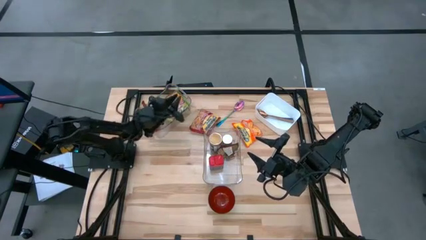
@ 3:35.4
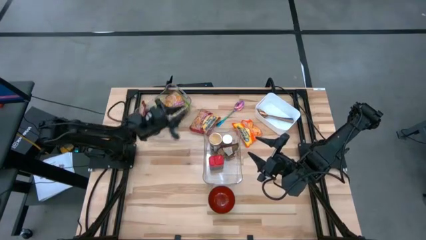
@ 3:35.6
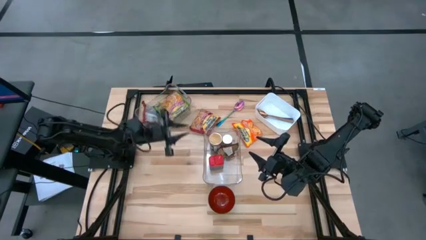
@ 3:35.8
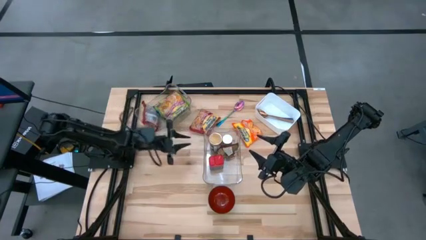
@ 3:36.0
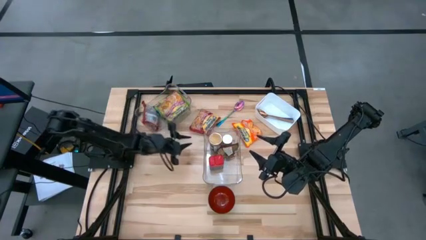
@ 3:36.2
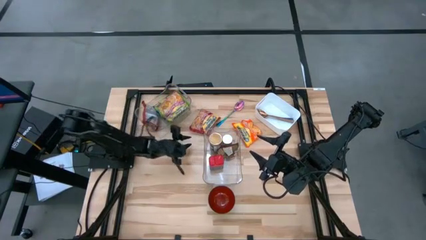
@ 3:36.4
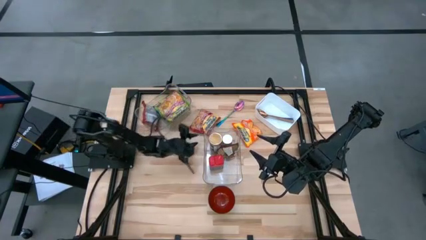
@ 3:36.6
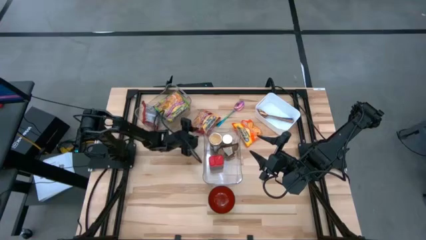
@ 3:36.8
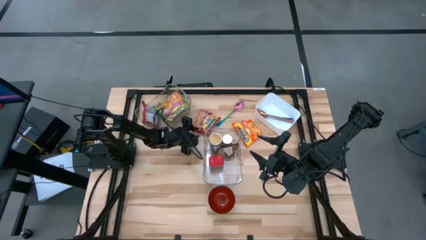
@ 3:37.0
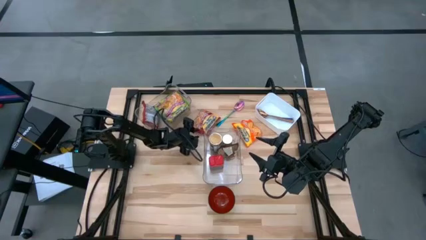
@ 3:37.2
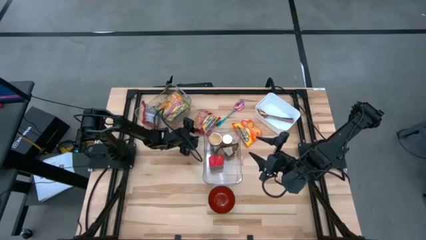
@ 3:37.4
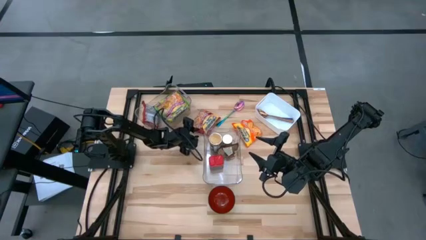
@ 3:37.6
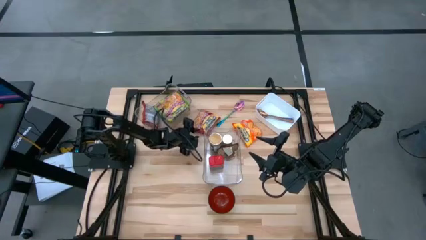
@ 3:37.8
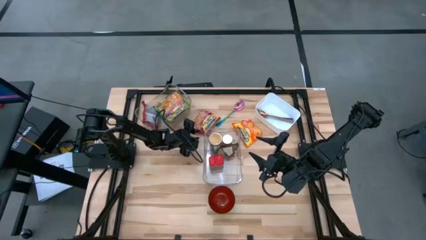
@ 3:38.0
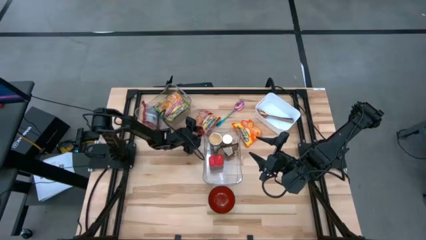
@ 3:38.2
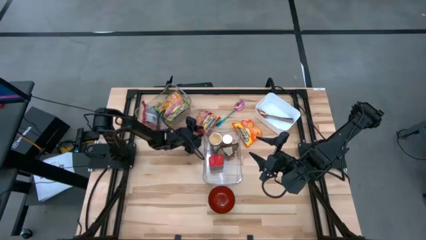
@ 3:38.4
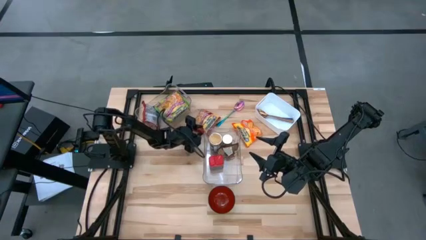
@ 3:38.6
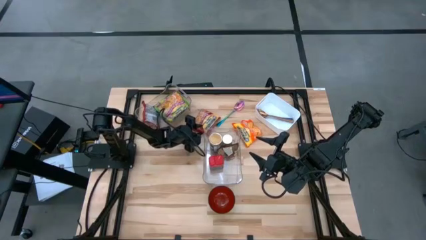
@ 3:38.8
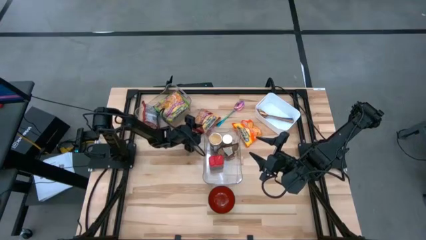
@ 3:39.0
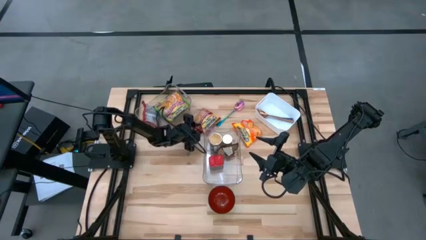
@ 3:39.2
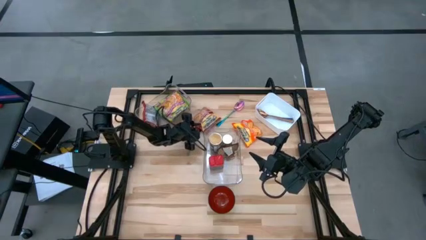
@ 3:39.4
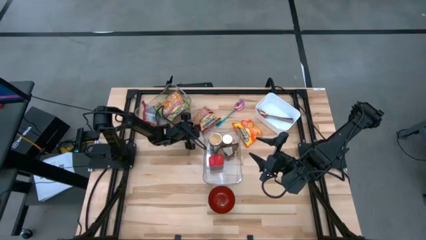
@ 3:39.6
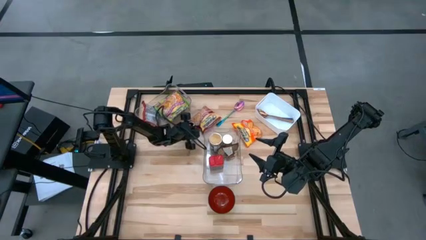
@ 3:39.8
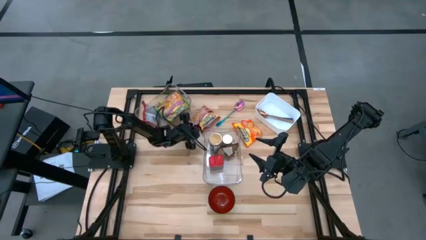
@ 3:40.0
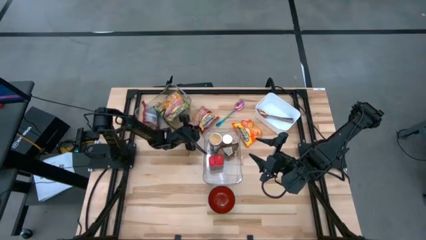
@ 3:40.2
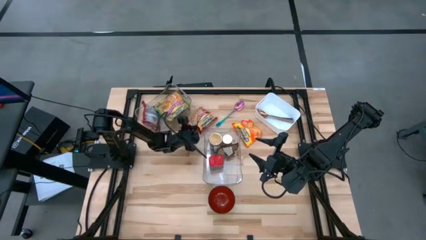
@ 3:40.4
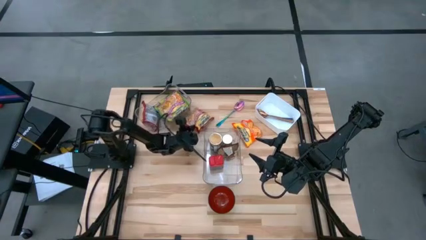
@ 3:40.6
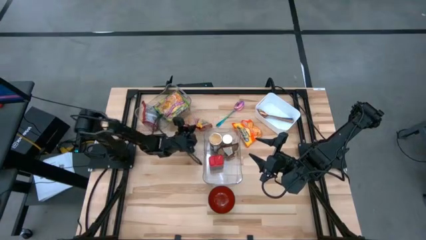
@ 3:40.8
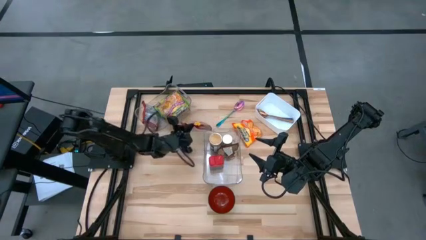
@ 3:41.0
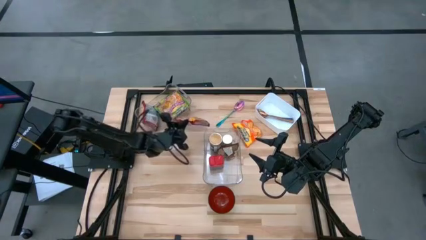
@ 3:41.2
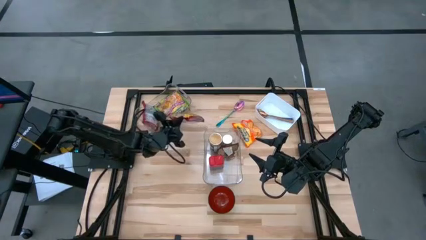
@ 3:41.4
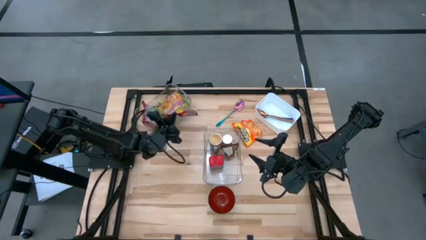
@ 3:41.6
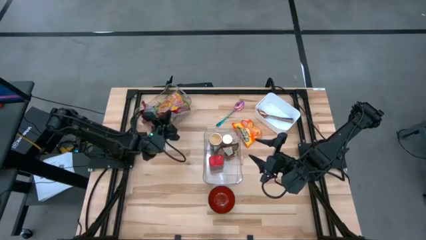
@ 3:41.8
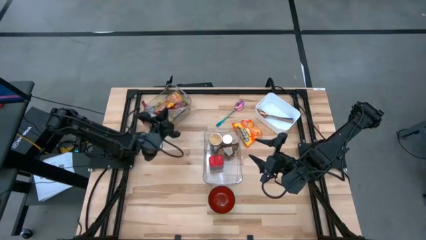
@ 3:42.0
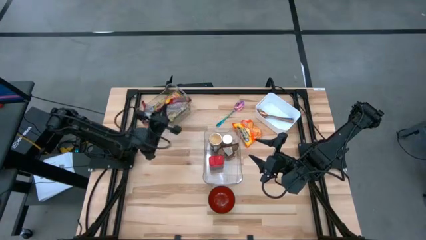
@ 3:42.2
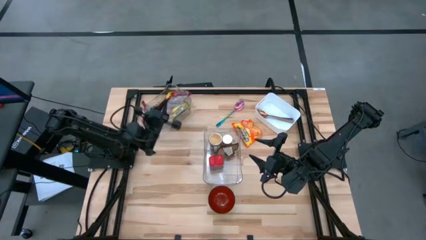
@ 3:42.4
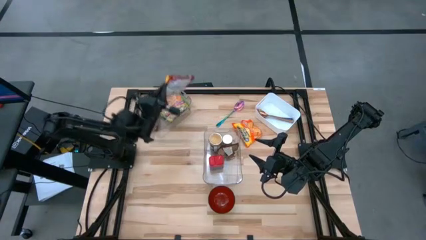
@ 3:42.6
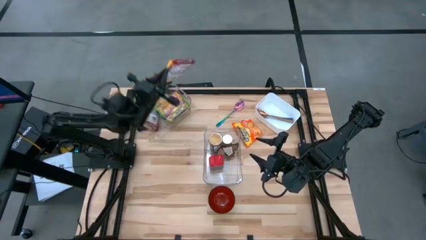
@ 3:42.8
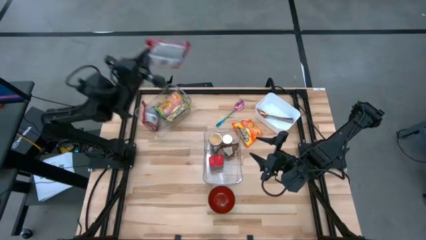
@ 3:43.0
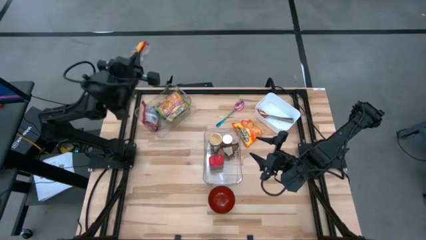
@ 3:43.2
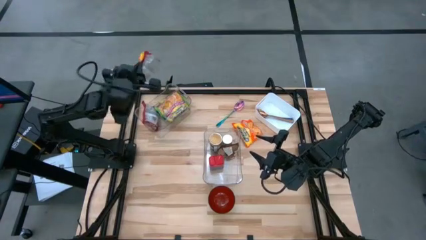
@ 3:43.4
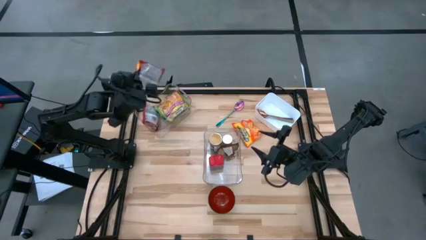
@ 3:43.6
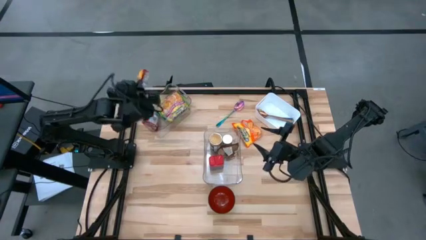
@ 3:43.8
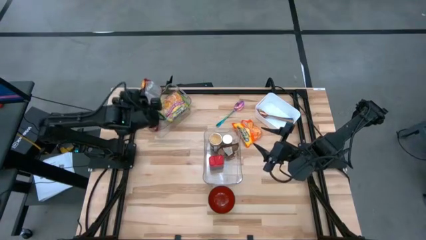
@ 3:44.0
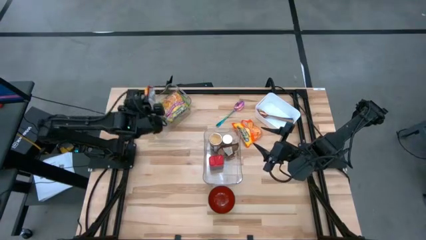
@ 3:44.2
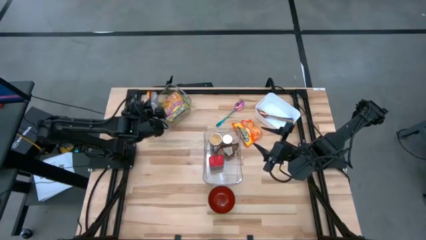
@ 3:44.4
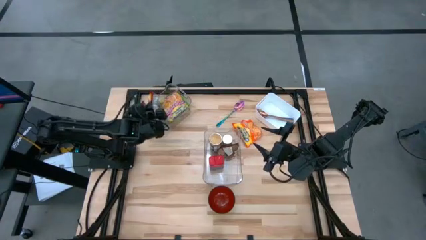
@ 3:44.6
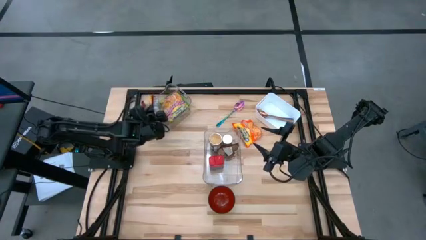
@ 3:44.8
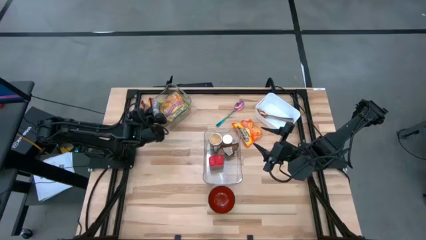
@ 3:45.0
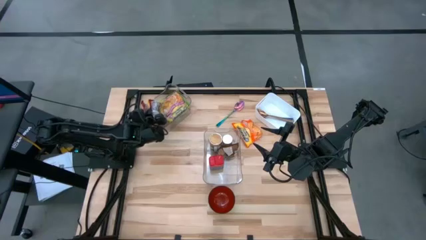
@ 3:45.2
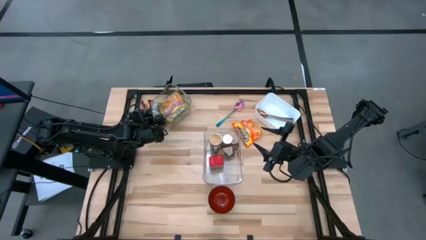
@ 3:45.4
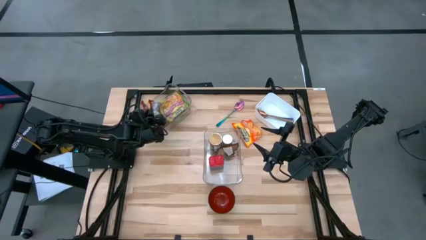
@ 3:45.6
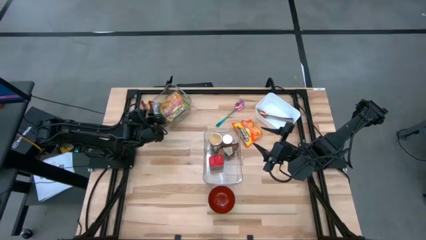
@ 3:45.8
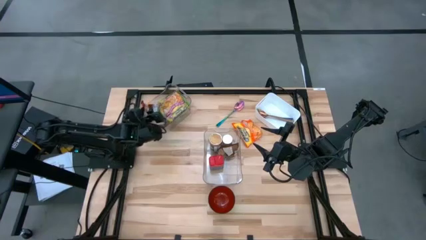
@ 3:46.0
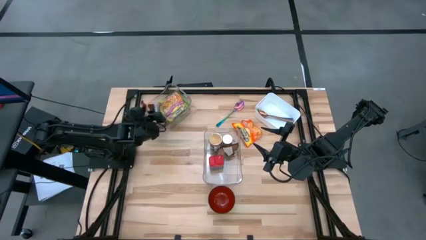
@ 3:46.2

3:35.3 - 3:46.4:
Task: Pick & Place Food Item
Put the red noodle pack into the top transparent bin

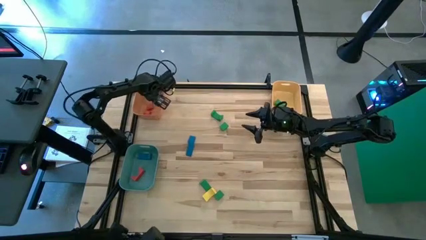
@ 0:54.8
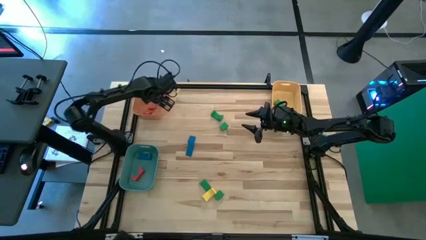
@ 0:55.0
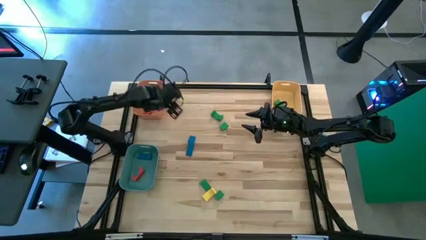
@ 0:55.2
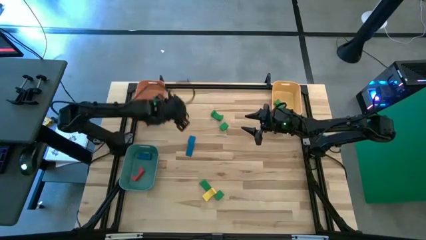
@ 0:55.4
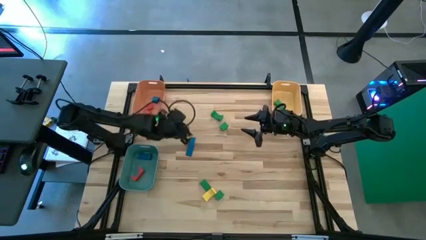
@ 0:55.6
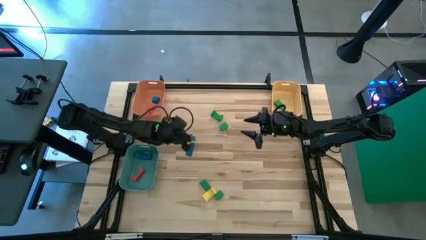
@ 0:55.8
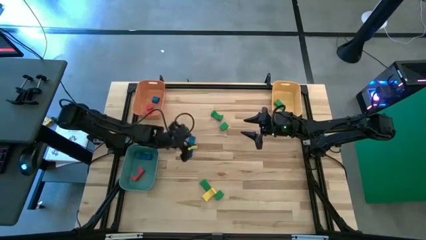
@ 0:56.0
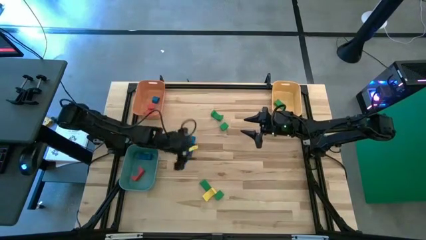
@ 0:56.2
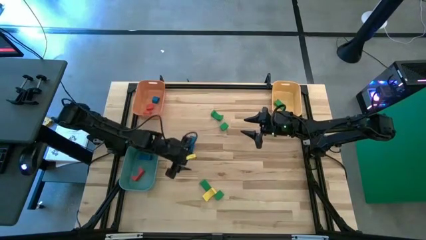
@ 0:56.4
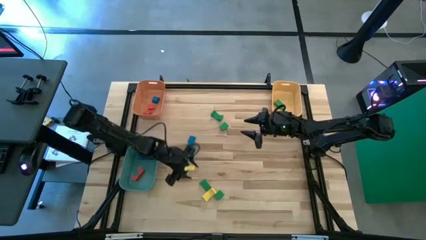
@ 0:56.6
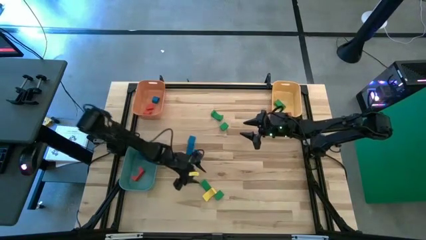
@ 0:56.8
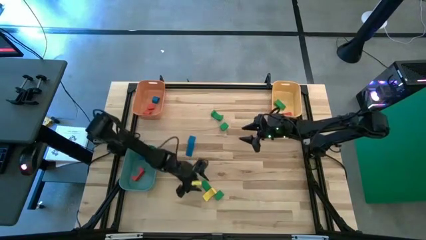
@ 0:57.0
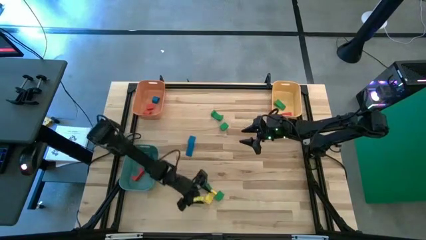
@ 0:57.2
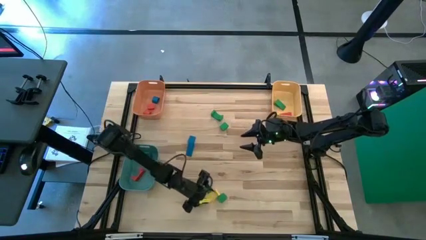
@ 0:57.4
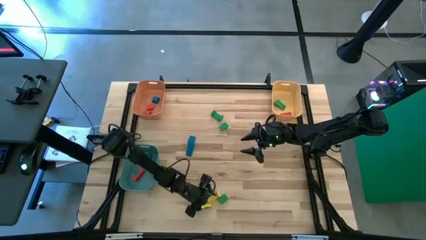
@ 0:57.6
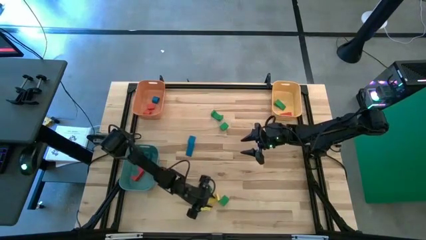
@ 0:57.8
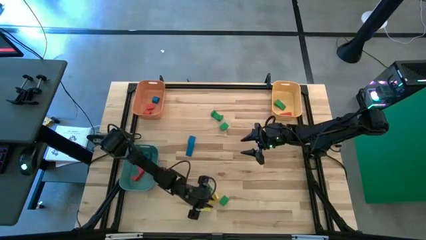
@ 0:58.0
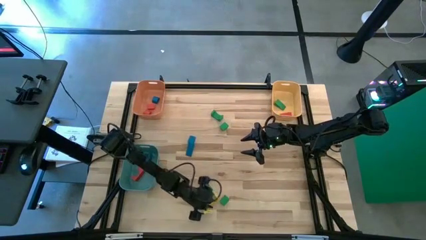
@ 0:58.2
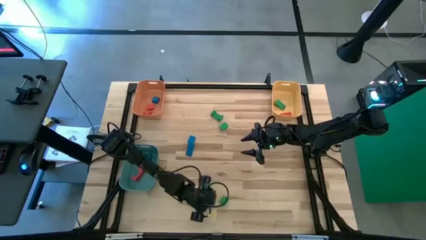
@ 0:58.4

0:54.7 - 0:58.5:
Task: Sort blocks by size
Put the yellow arch block into the blue bin
